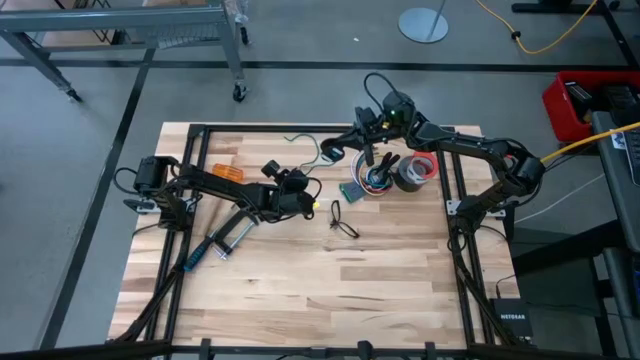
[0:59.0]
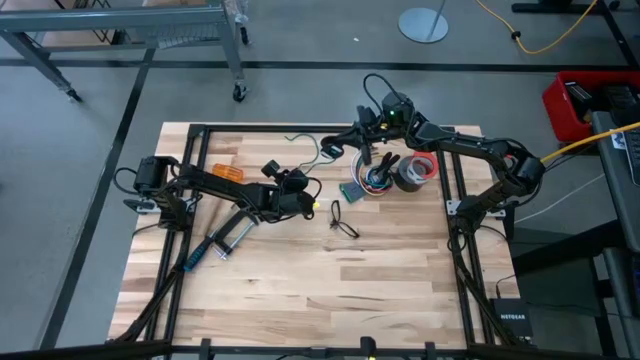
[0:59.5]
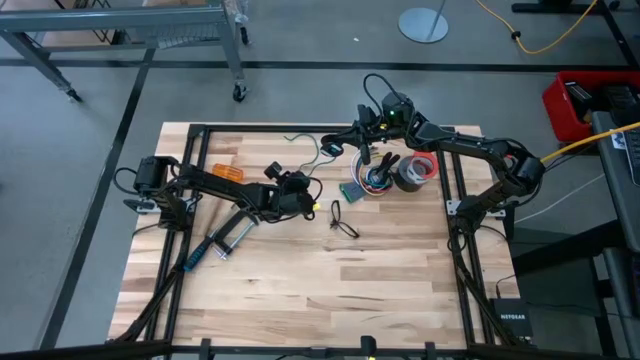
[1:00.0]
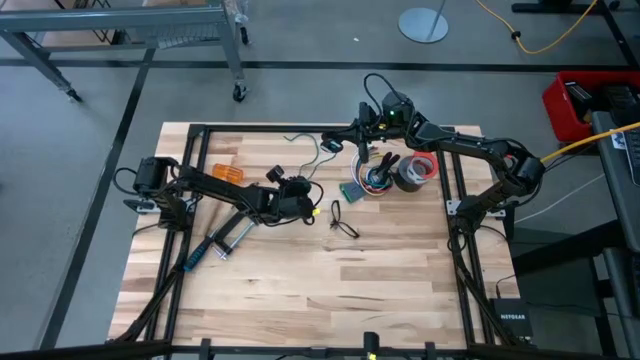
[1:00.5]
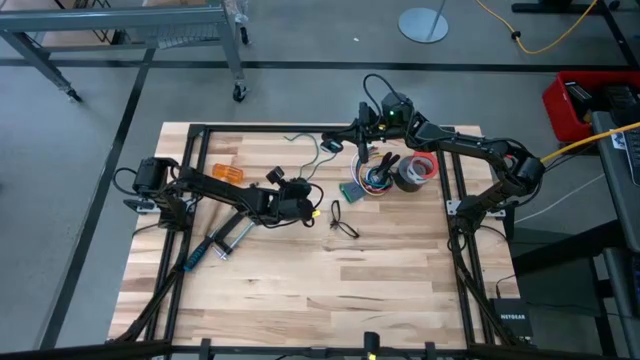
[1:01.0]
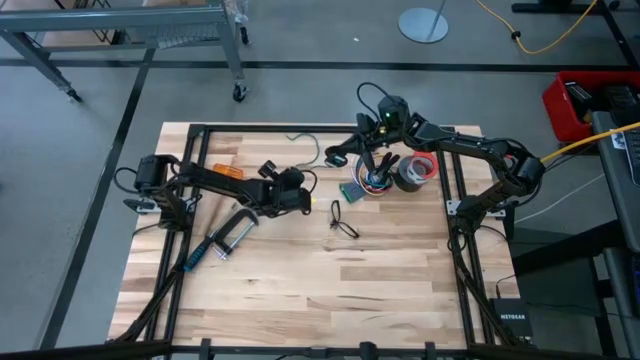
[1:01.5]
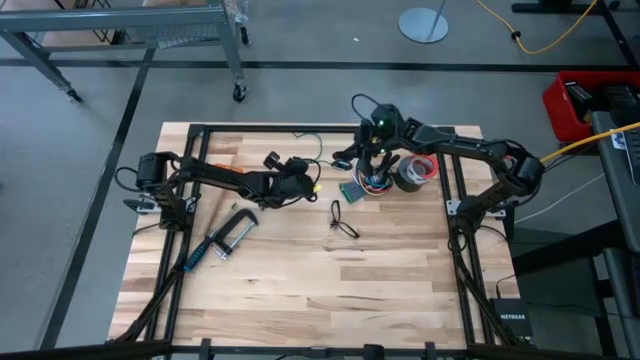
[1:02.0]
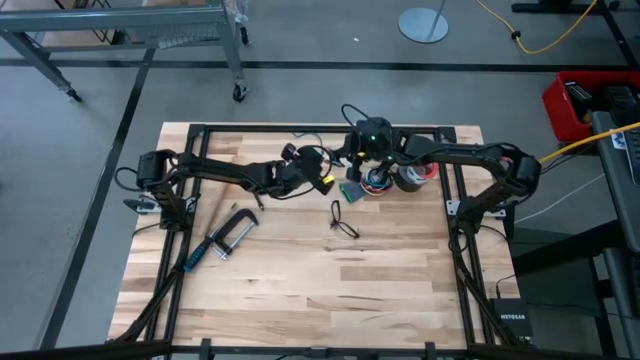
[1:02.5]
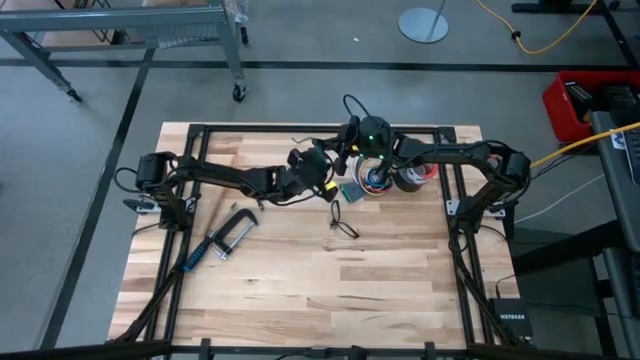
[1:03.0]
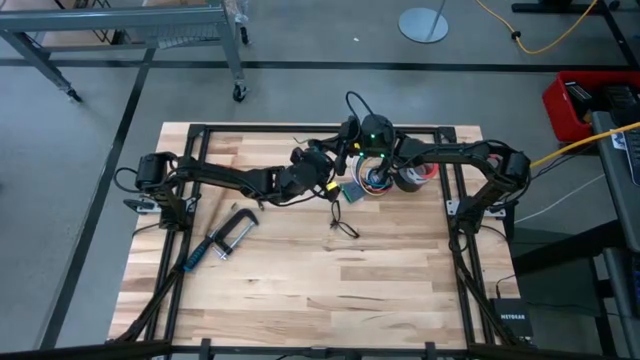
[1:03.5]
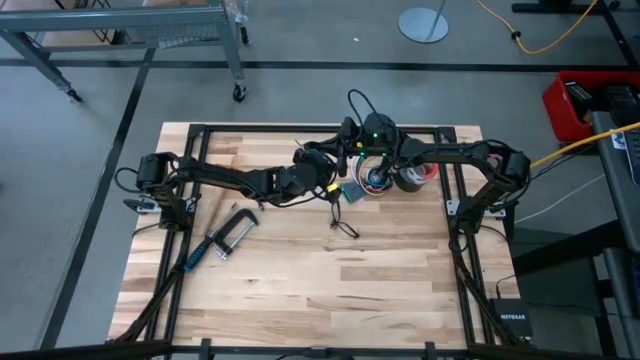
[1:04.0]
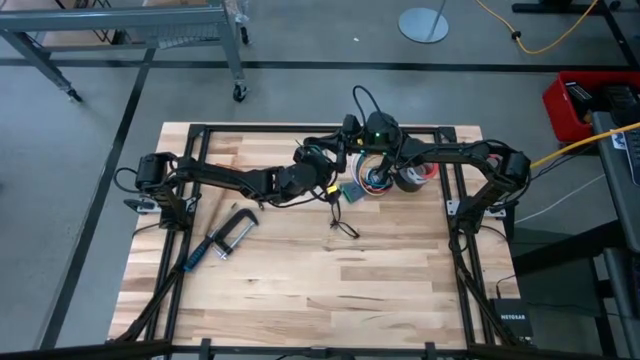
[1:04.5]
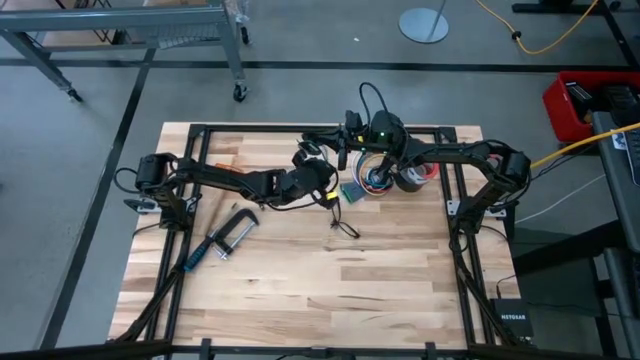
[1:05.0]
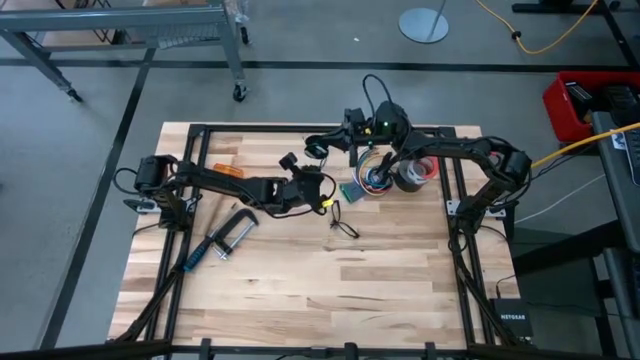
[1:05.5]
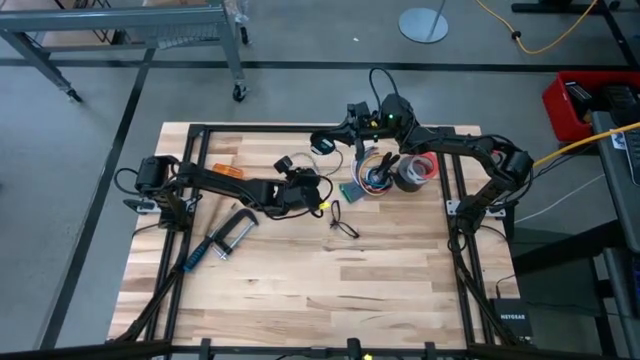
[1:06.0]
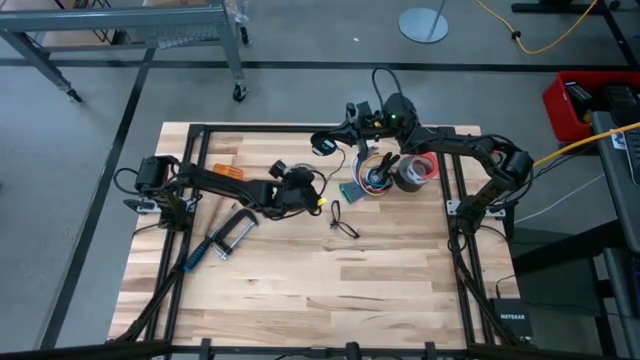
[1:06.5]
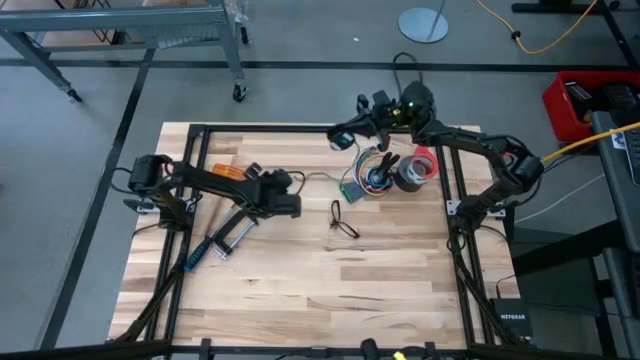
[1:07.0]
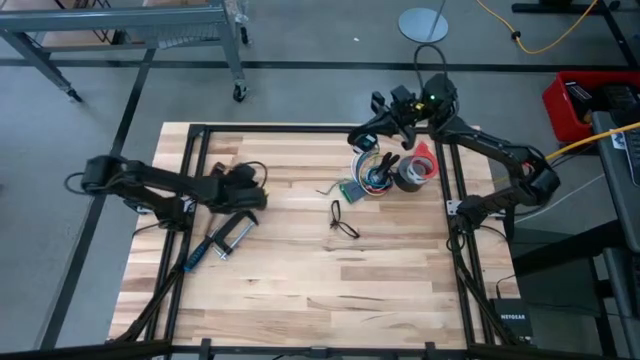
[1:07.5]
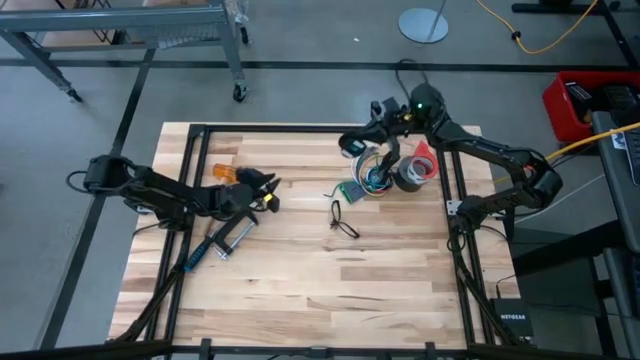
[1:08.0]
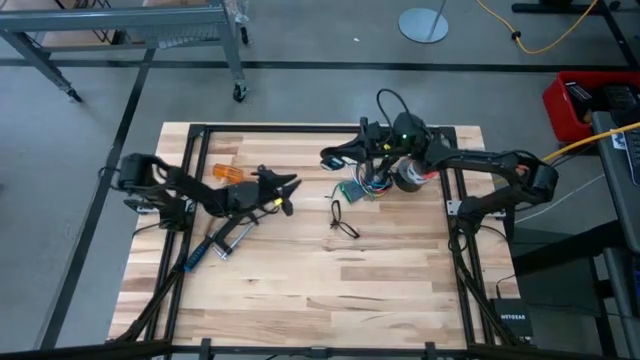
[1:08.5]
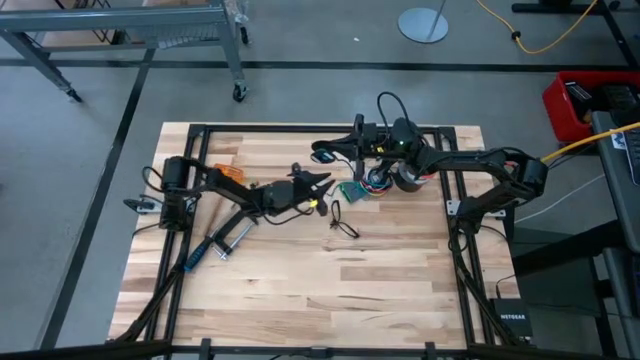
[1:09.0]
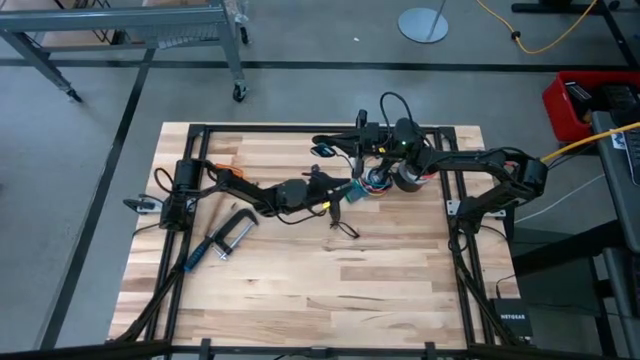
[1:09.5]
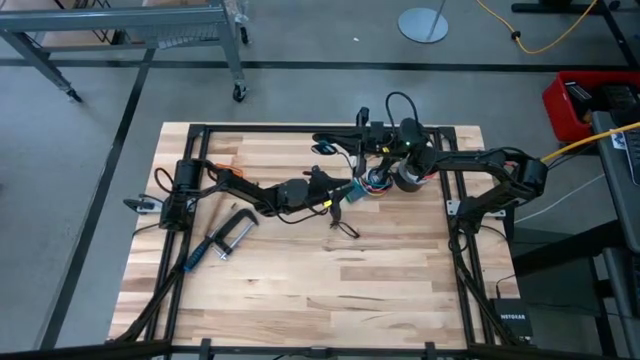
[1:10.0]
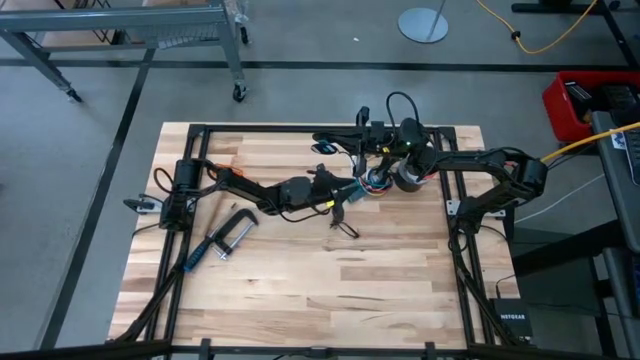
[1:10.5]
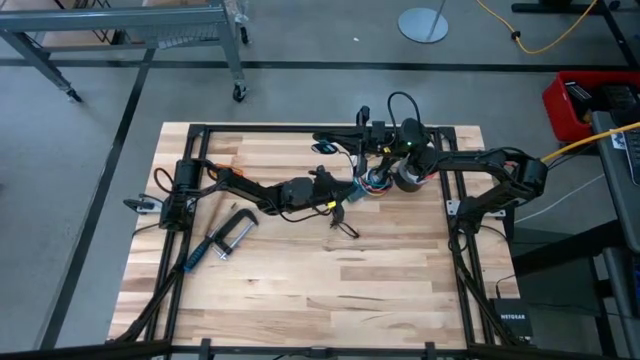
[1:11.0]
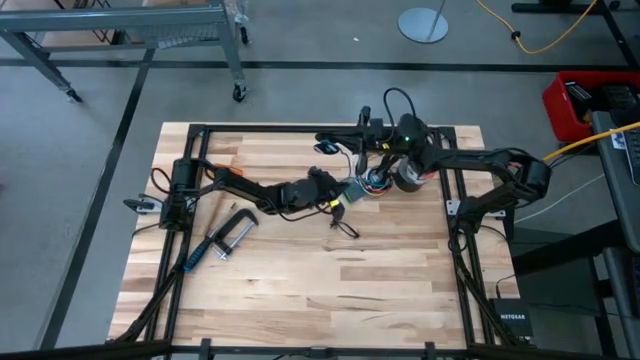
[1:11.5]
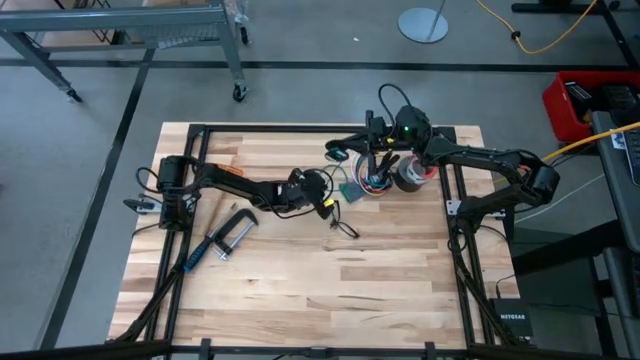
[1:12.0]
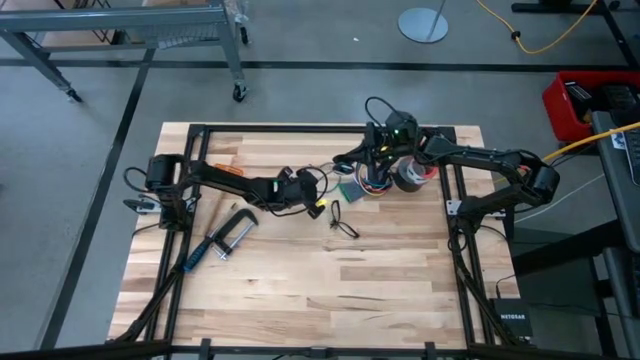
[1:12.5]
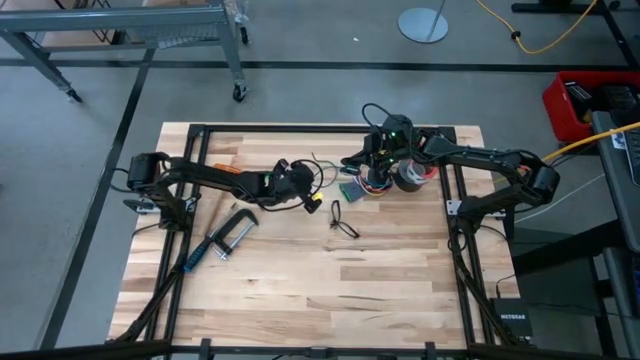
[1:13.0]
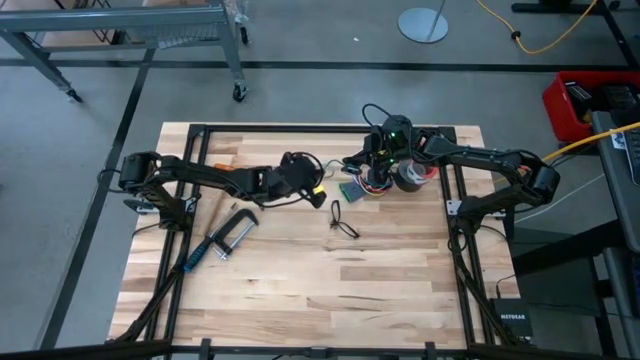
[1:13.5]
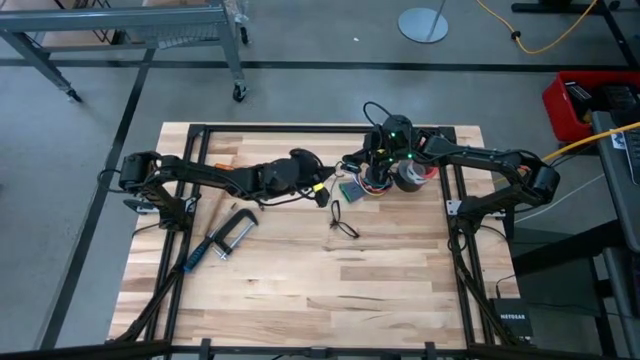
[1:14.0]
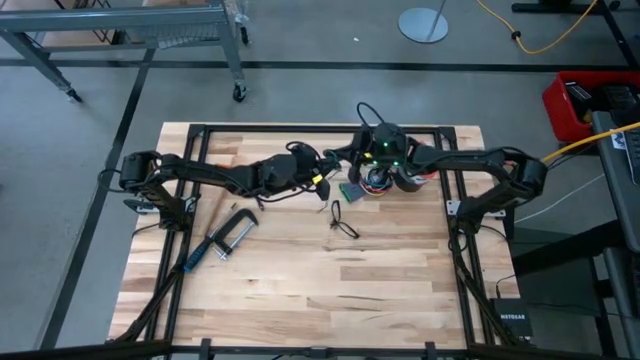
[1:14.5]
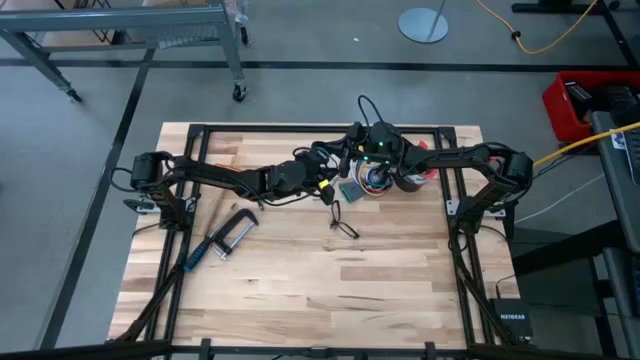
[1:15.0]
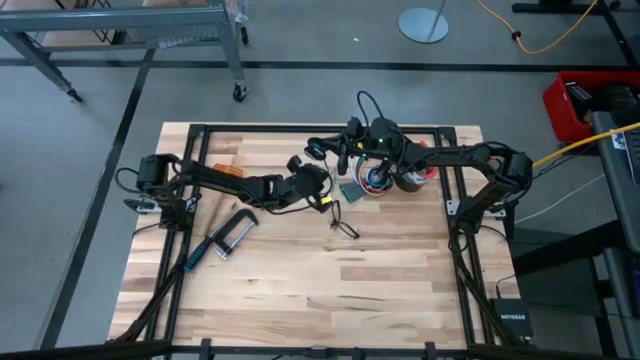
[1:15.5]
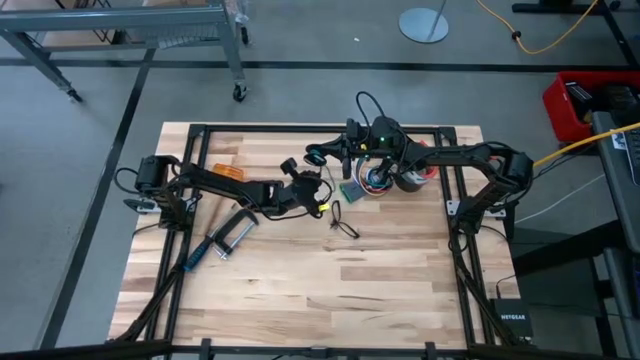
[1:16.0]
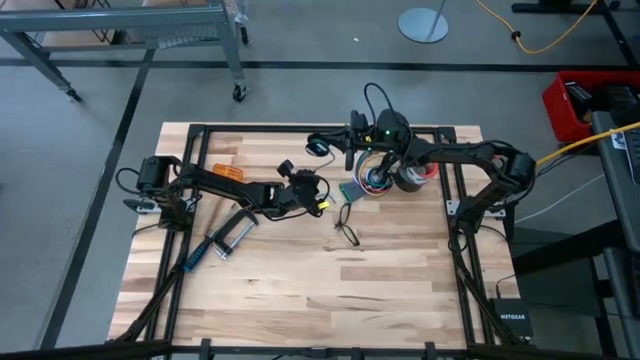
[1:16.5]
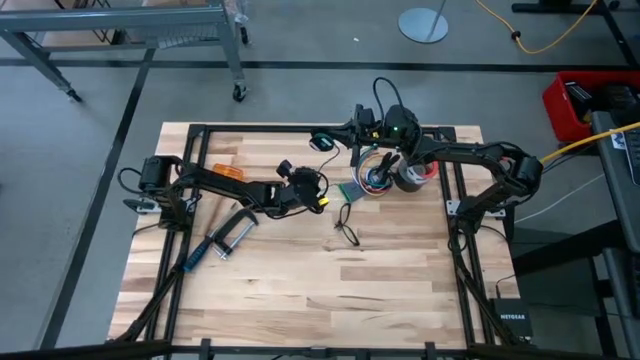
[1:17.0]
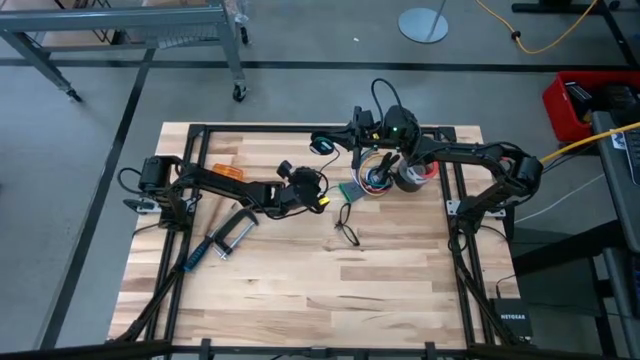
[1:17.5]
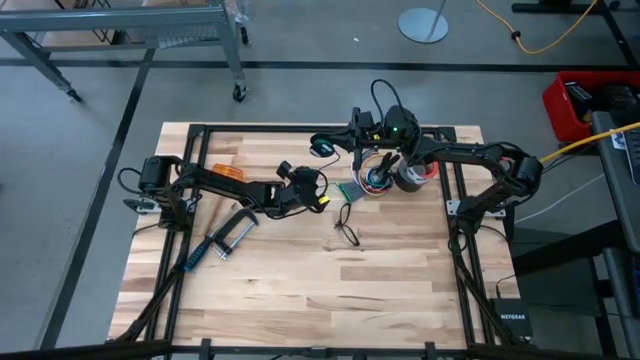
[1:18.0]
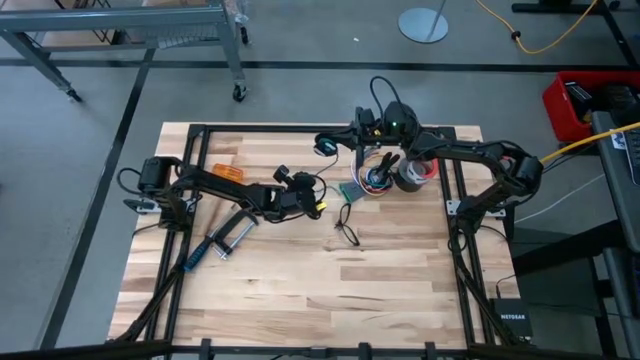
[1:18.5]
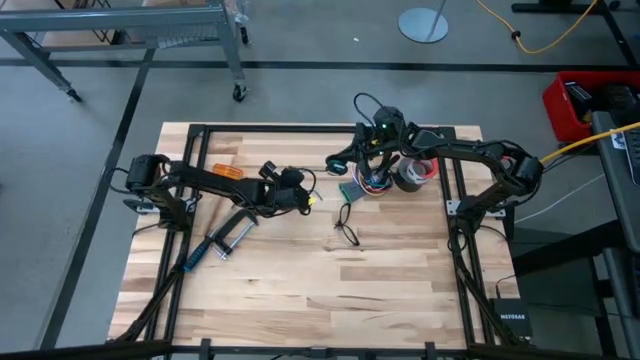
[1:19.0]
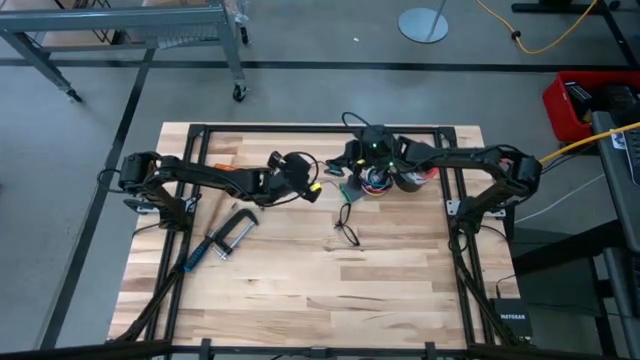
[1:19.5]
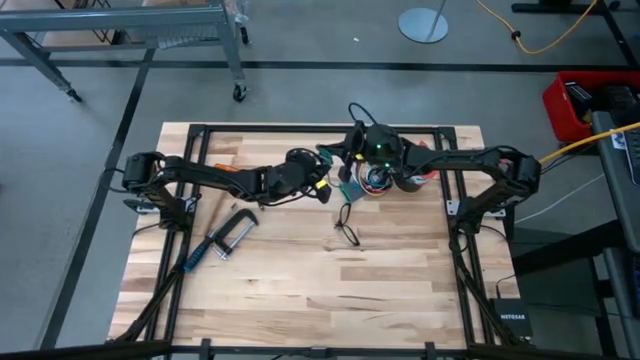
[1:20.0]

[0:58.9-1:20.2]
Task: Coil cords
Coil the green wire on the black spool
